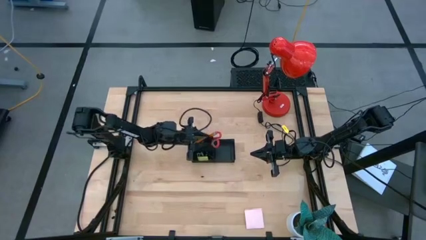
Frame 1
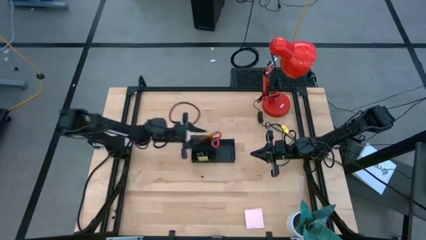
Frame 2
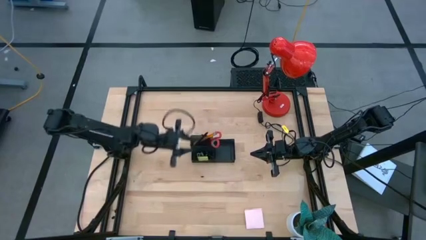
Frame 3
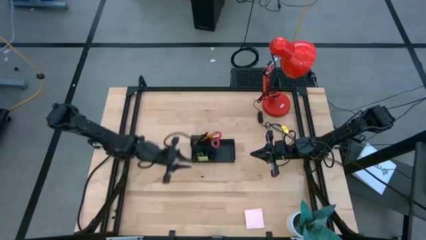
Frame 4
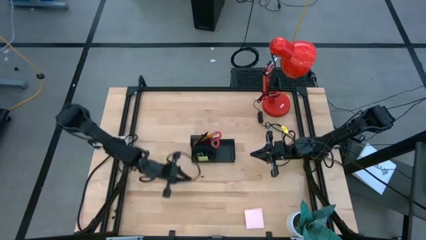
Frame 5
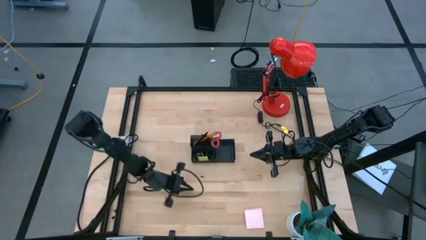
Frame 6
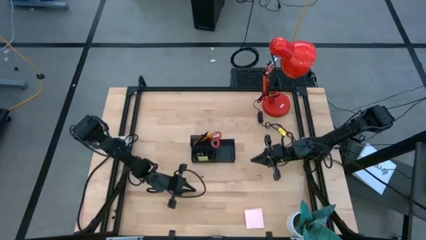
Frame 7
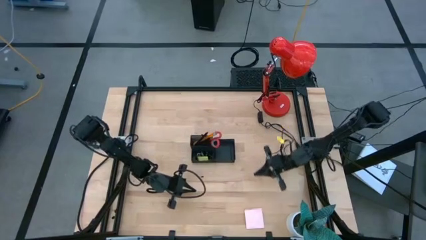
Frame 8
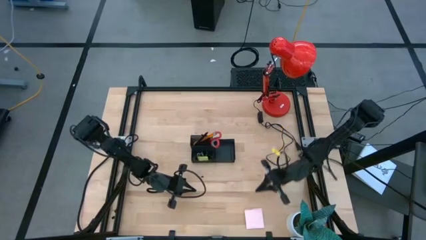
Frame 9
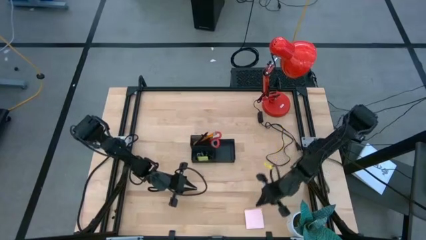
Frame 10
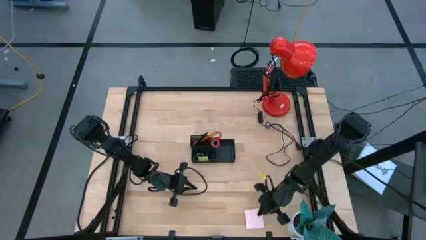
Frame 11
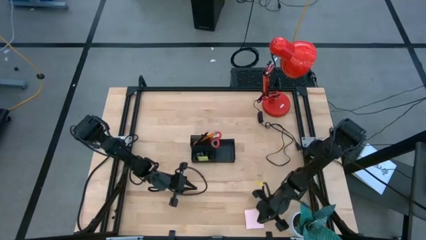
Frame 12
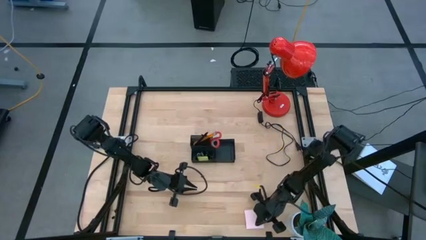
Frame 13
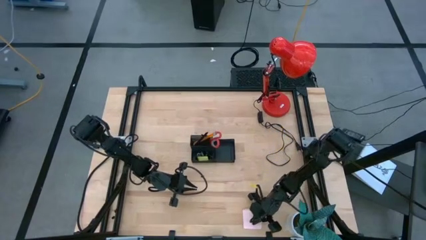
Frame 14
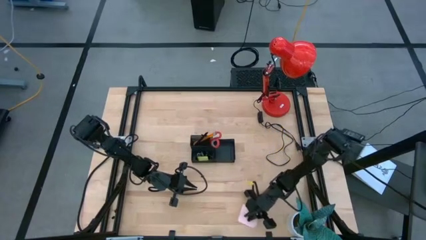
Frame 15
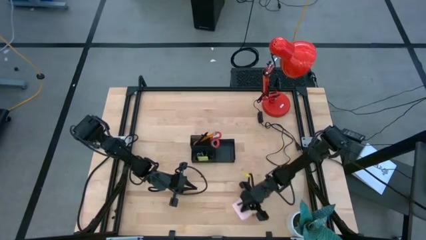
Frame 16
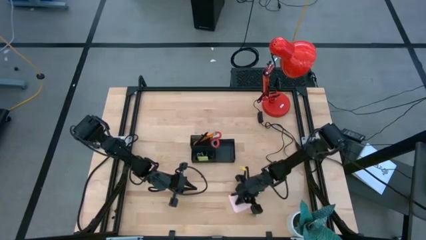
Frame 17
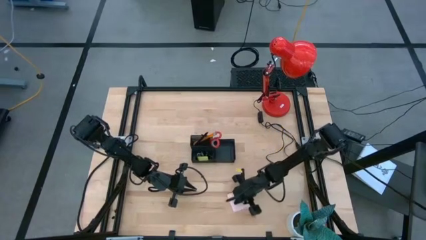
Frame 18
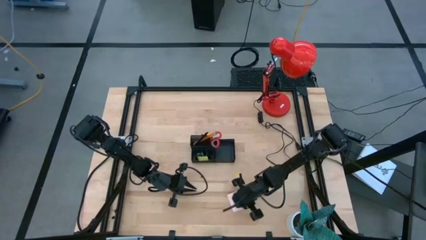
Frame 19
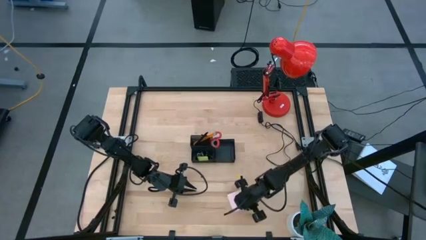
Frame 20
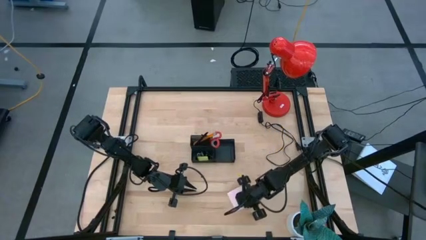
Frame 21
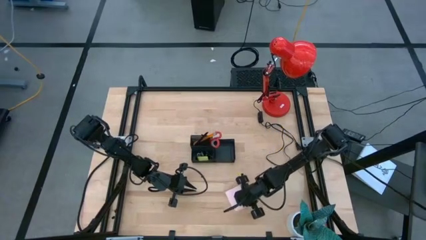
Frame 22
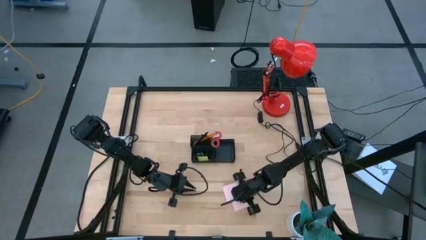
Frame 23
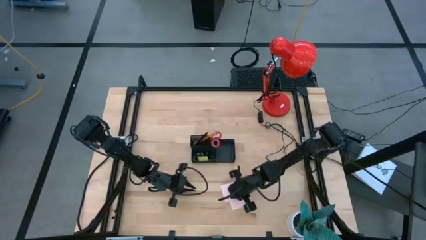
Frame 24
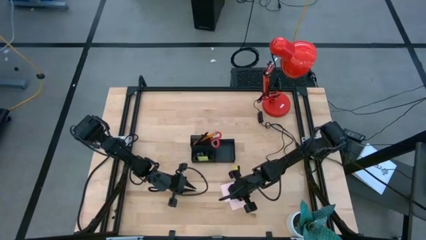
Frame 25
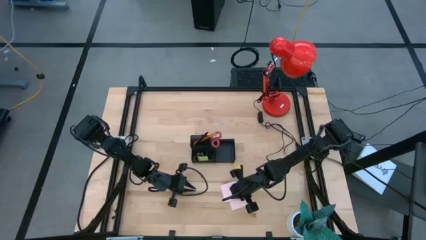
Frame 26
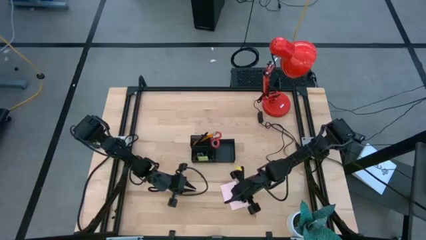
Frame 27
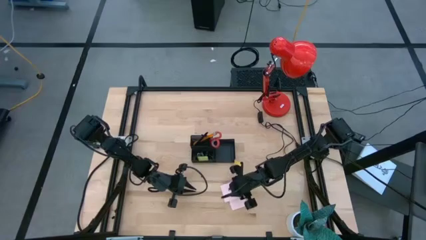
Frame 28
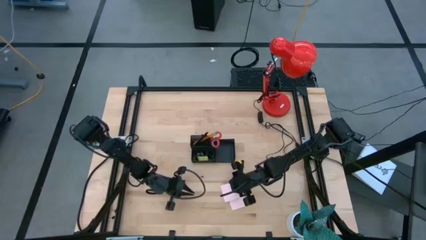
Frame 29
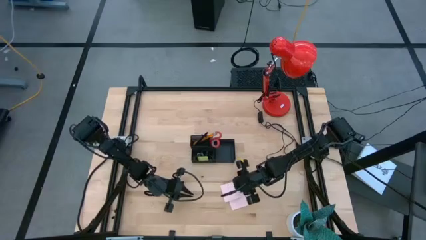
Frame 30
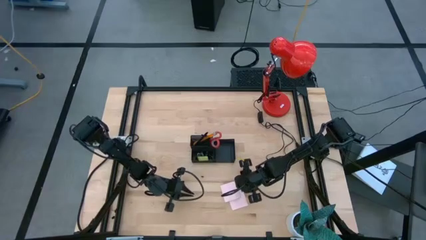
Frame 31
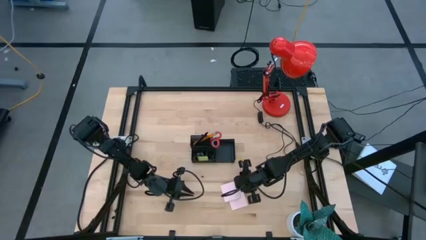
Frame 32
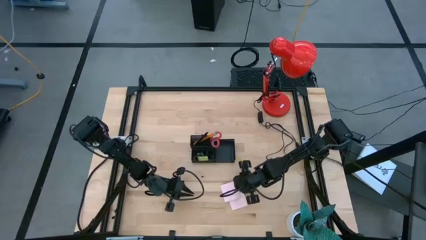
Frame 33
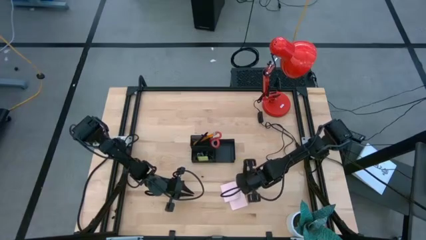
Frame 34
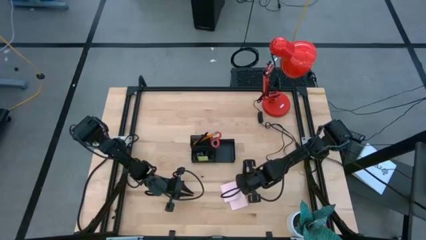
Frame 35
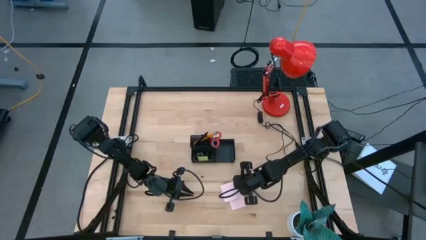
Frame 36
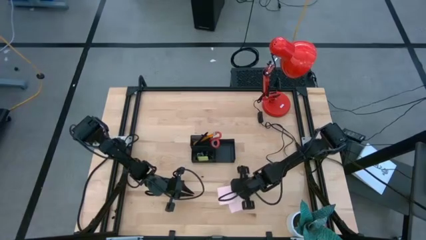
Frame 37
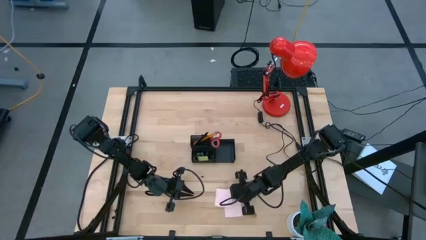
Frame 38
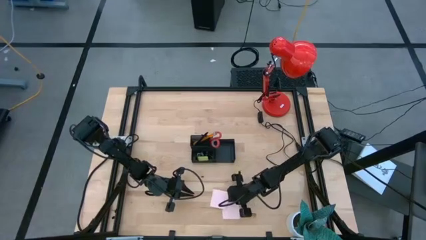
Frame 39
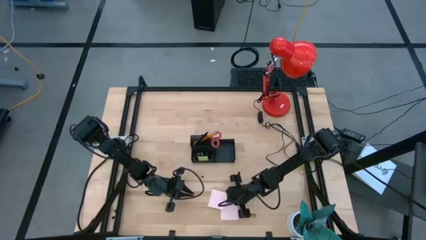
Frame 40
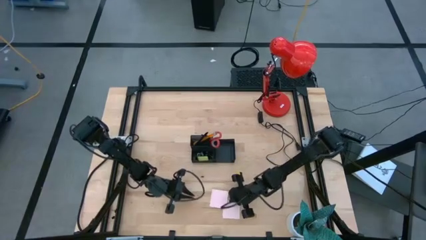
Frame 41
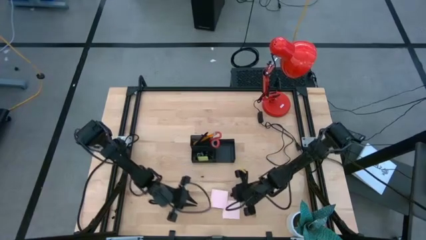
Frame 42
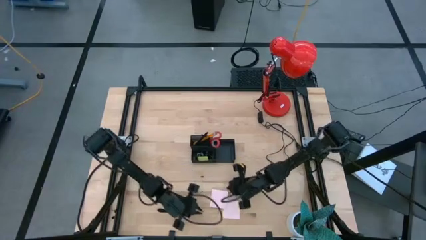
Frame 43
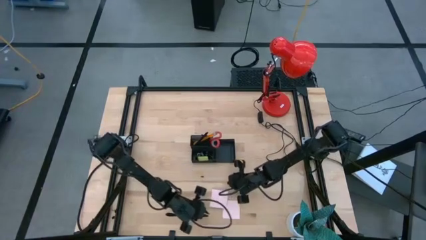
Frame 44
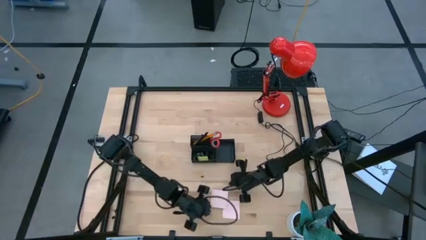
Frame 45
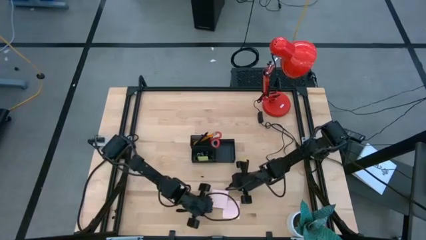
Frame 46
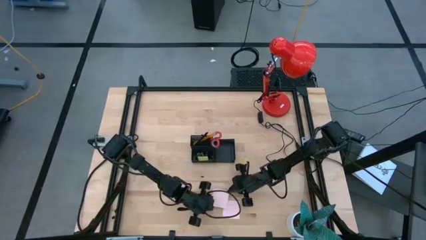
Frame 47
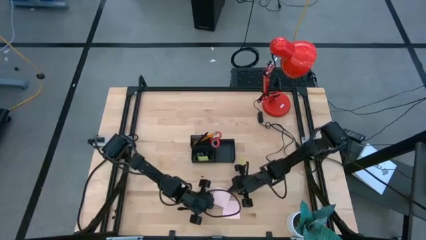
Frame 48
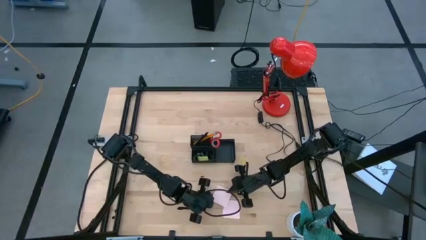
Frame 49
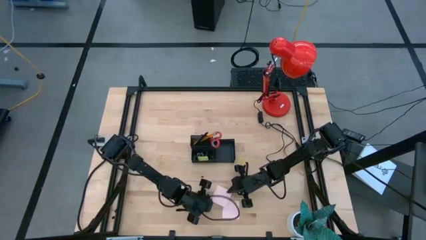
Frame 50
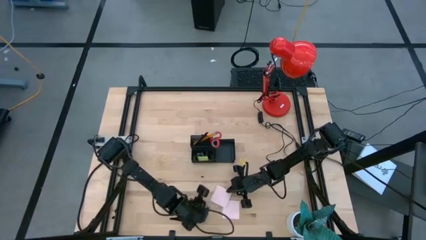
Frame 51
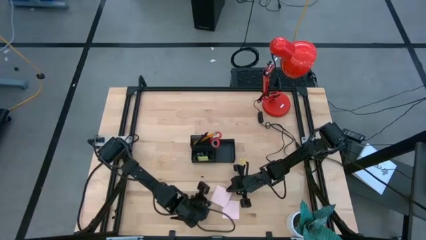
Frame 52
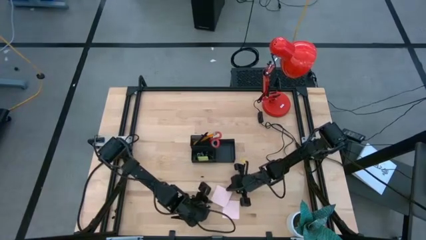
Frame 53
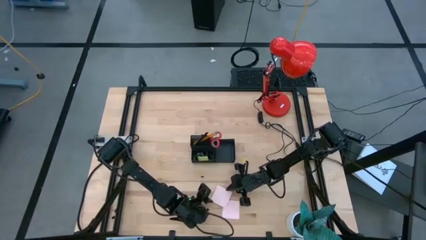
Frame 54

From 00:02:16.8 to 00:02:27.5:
Task: Pick and place office supplies into organizer
Put the pink sticky notes into the black desk organizer

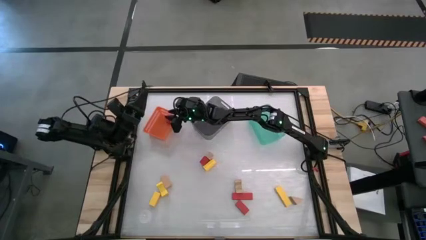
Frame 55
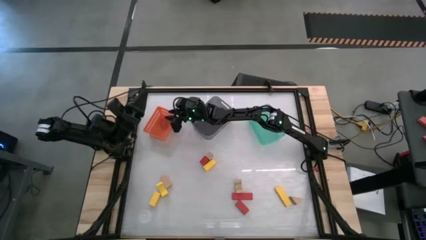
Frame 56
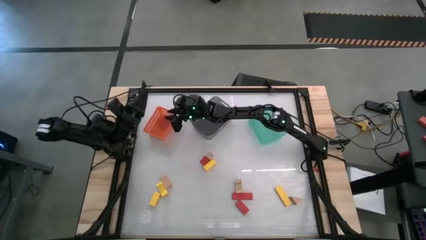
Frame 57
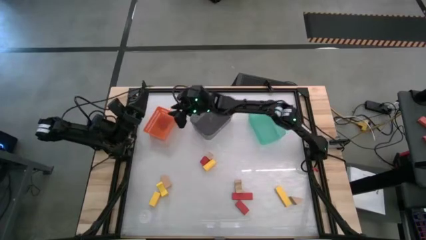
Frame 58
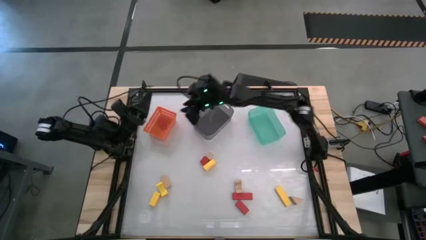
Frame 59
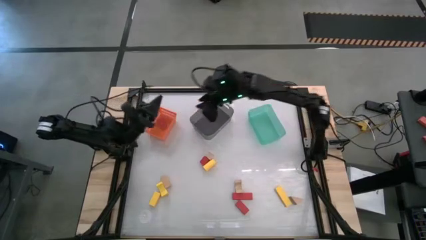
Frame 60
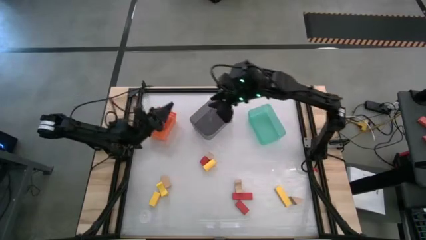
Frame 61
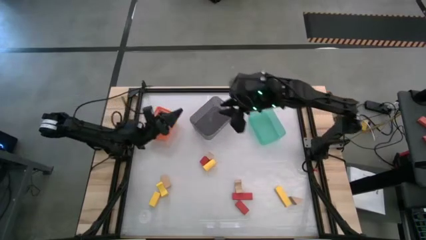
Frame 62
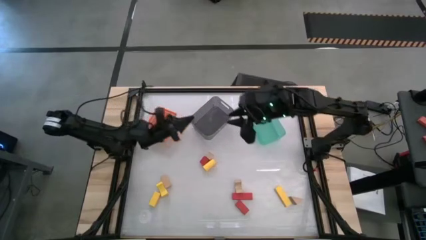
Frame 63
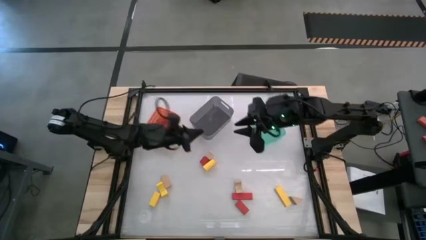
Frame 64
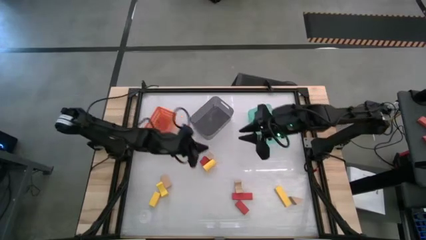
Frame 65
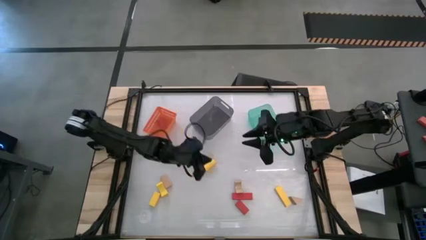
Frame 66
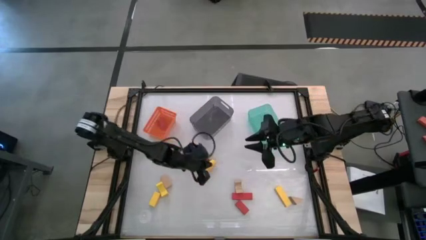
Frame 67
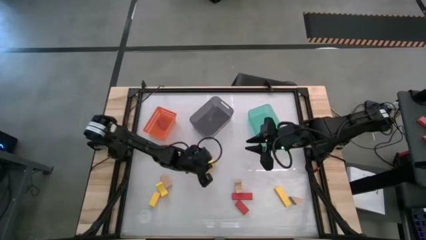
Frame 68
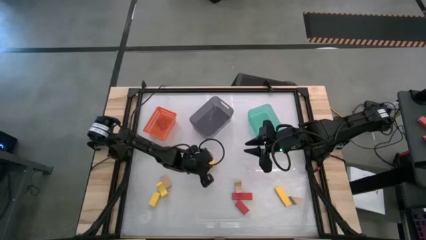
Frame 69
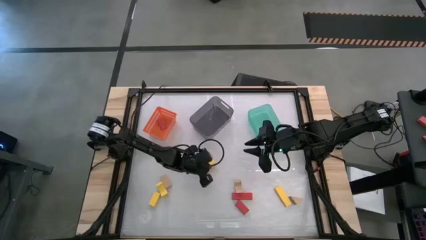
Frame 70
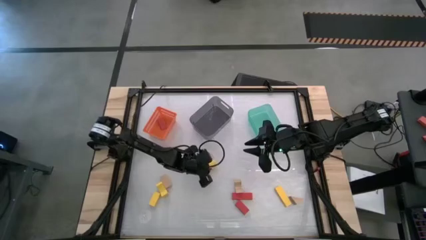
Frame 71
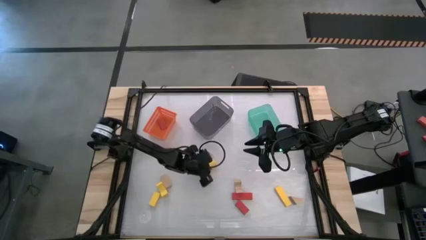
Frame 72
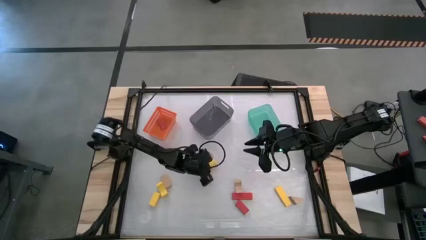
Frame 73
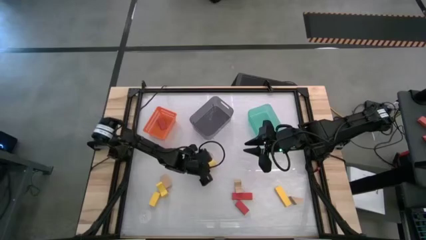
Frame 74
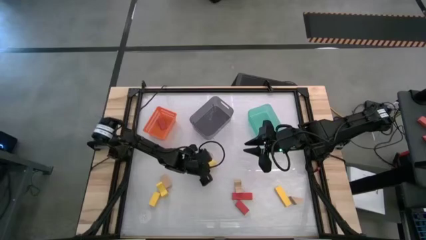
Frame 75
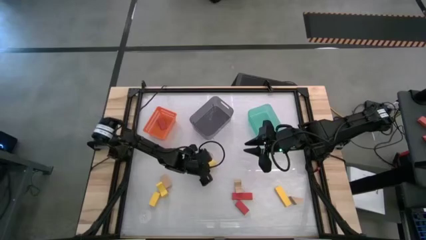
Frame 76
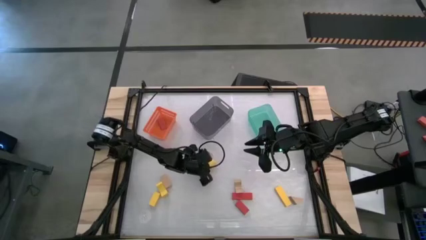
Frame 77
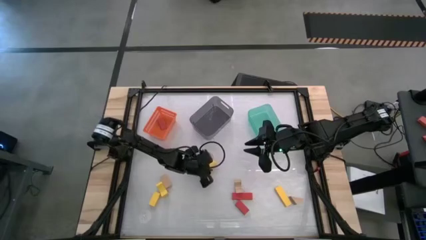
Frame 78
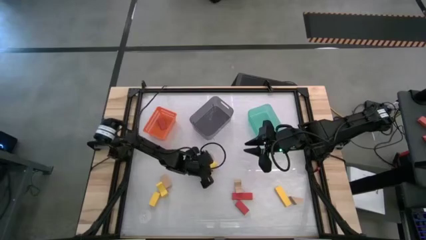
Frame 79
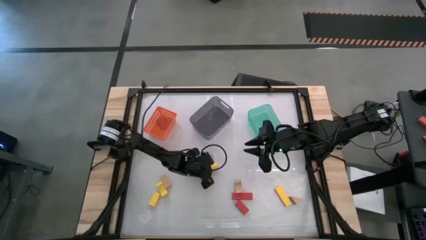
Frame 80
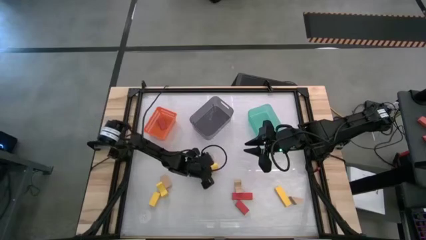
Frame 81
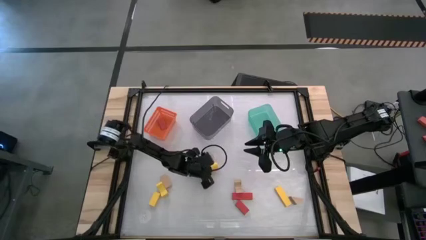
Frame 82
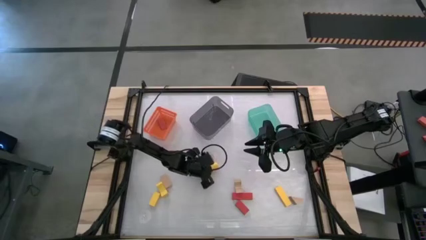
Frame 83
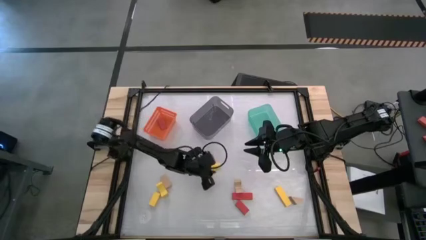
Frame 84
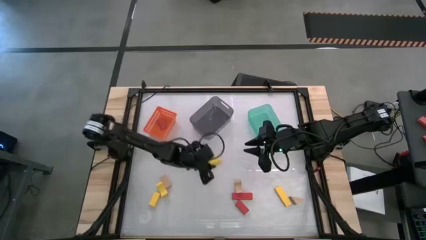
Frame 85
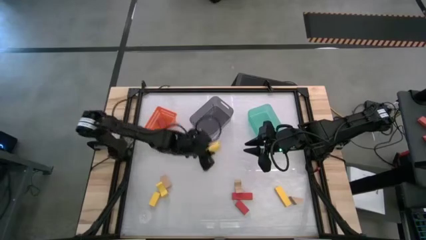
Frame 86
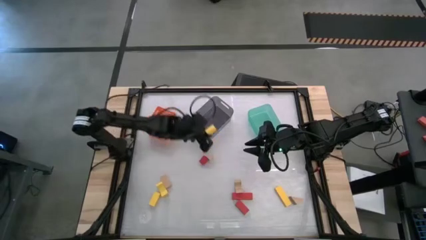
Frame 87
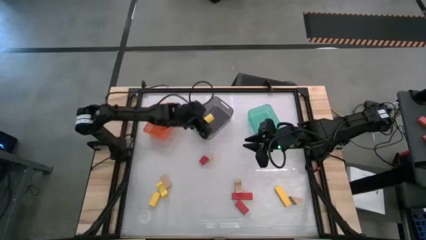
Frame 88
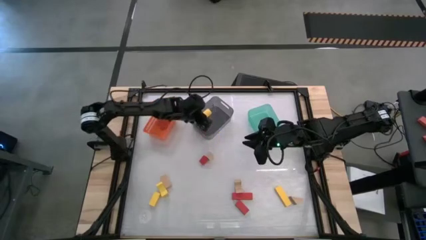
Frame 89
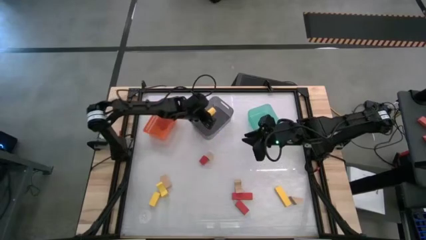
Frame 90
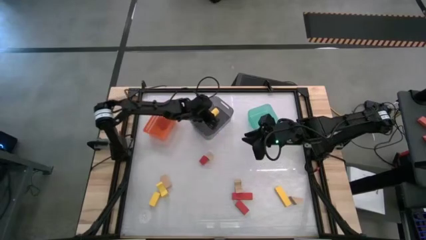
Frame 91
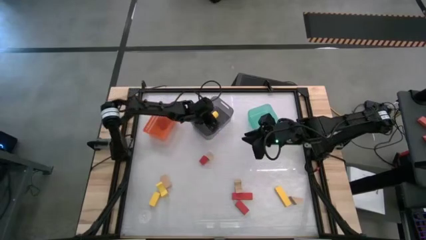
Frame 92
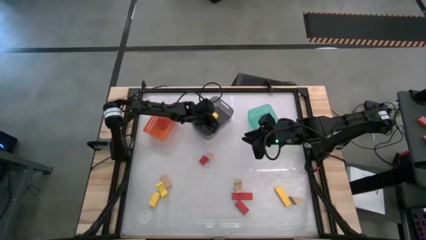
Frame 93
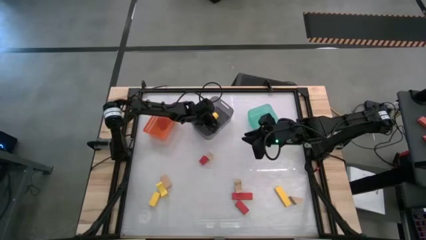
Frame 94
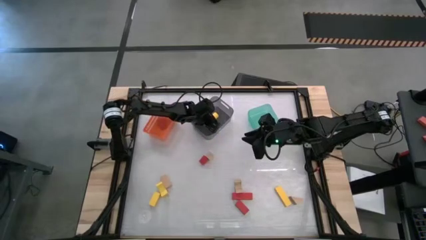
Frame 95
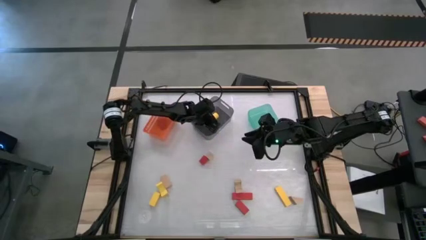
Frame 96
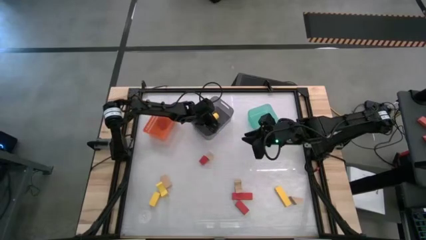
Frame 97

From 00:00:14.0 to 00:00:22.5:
Task: Sort & place blocks by color
Put the yellow block into the black bin
